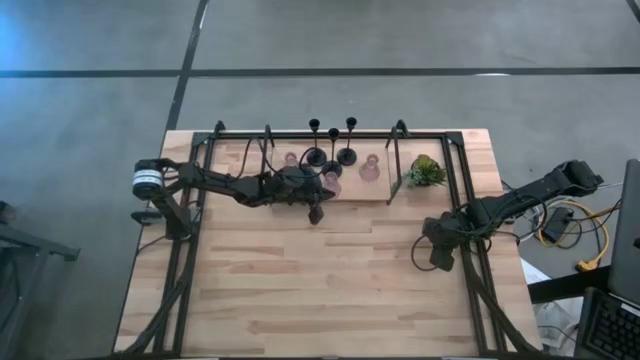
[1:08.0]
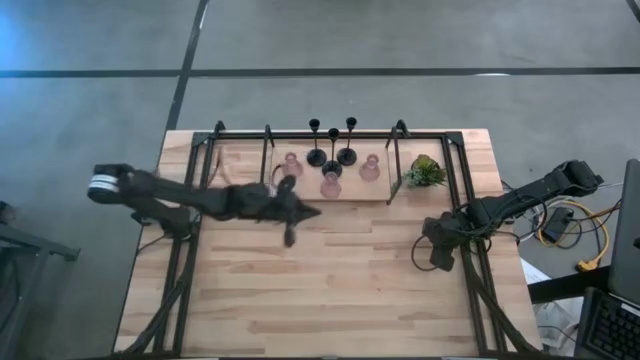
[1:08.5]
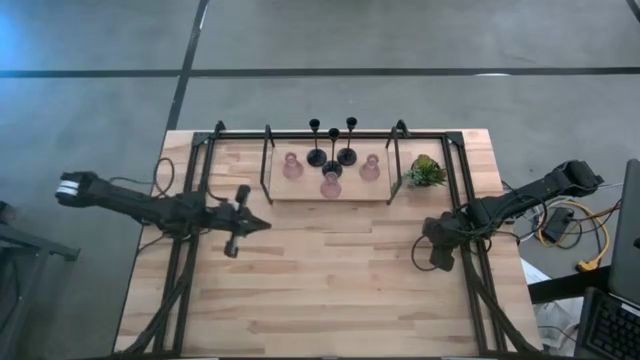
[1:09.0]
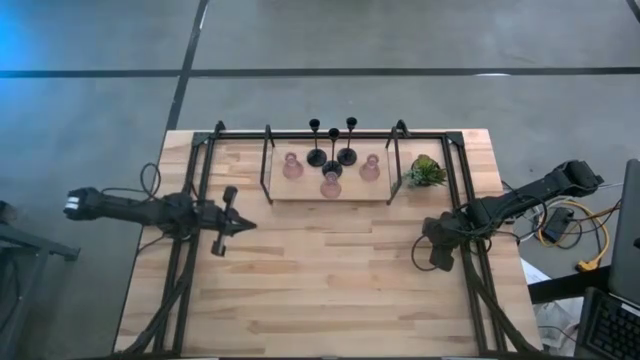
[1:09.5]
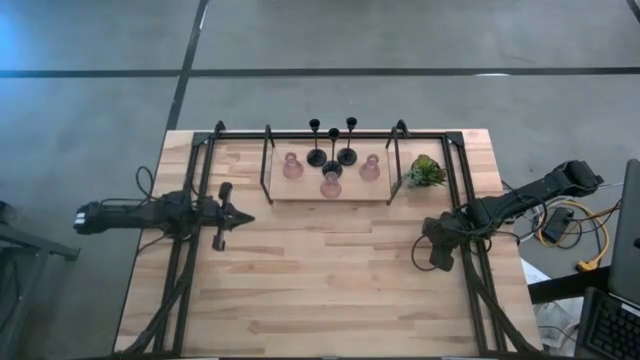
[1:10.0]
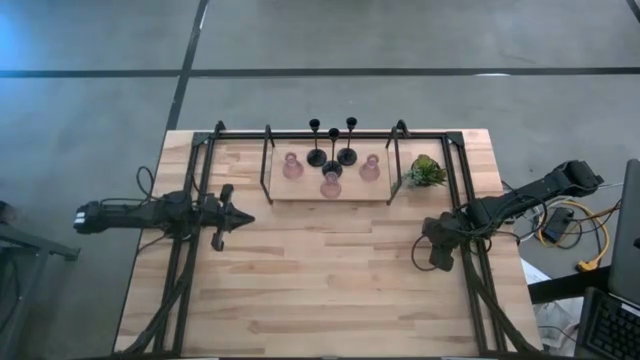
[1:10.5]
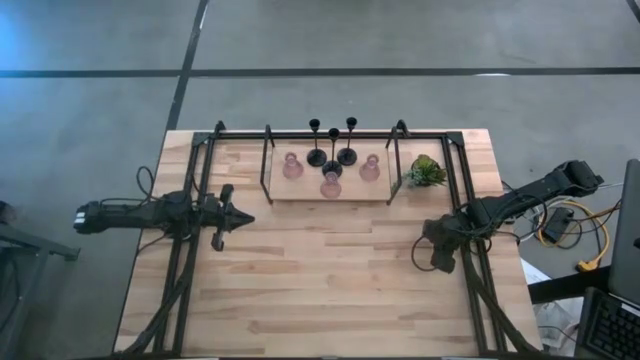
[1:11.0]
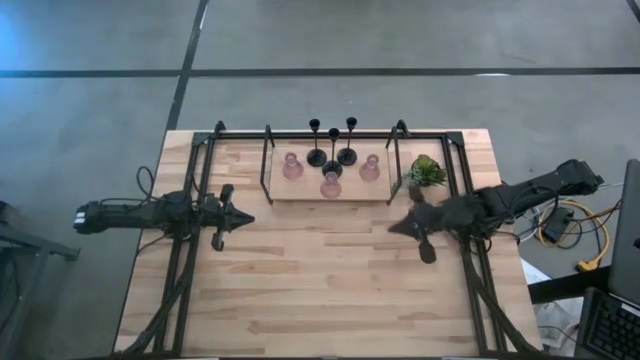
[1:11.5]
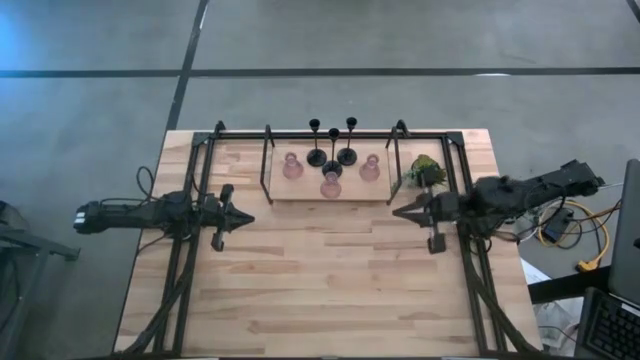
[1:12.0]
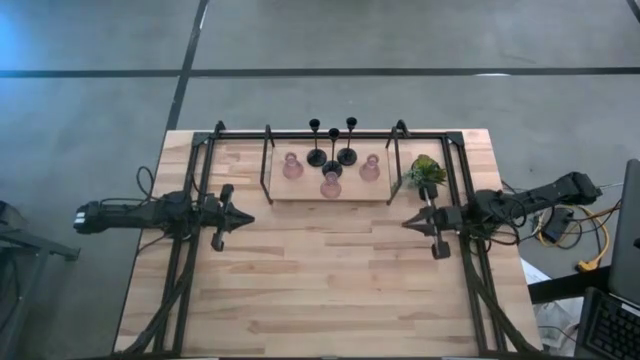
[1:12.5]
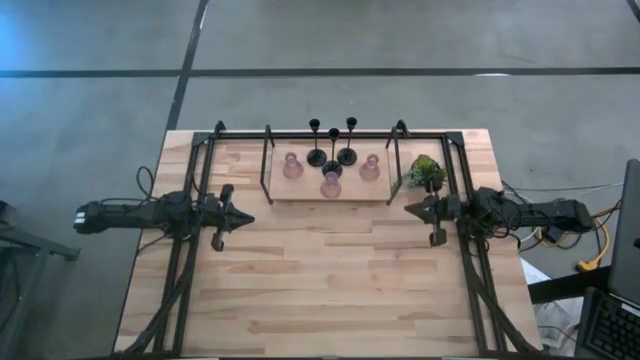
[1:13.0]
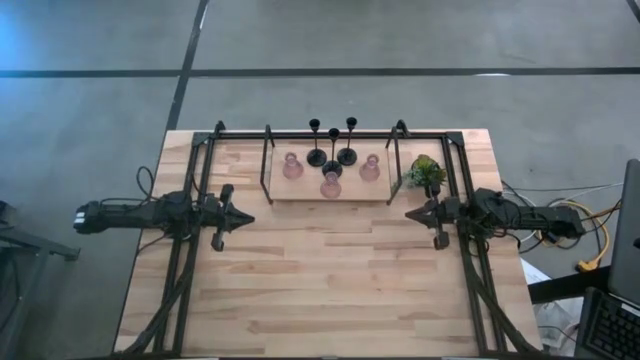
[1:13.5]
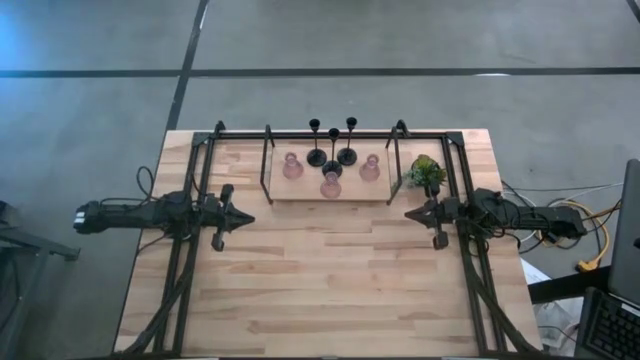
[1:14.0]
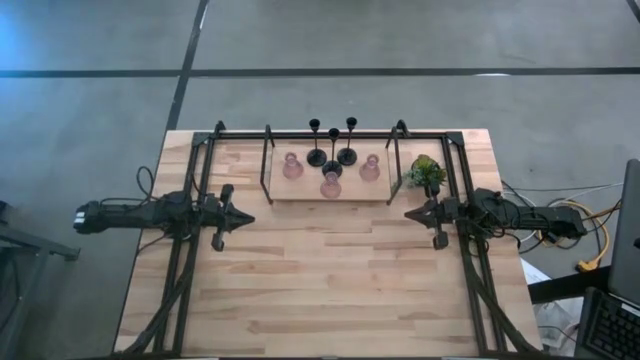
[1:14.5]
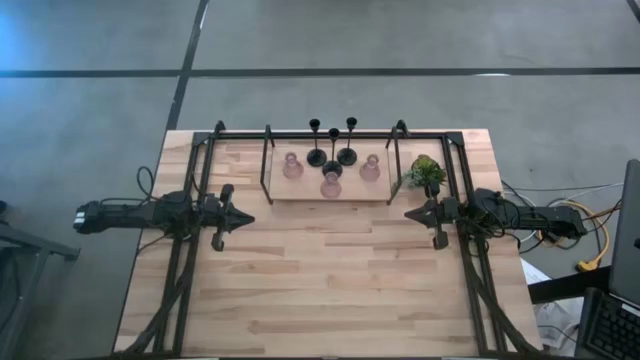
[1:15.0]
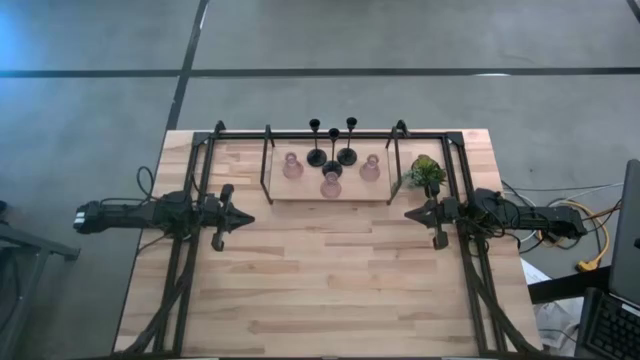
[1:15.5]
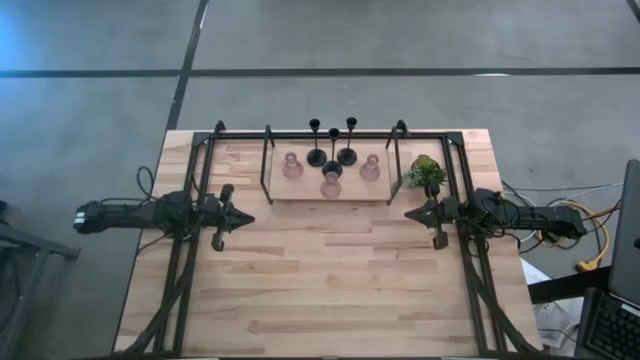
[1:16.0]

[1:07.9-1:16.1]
Task: Pick & Place candle stick holders
Return to Home Position

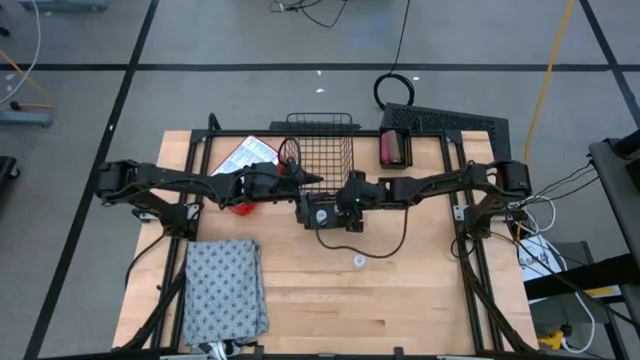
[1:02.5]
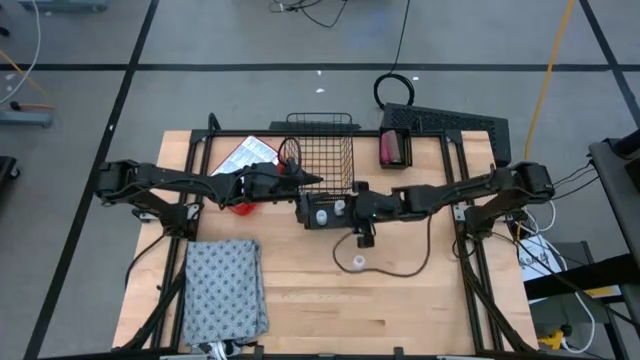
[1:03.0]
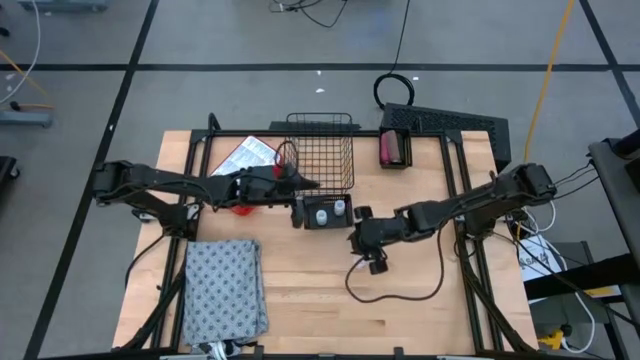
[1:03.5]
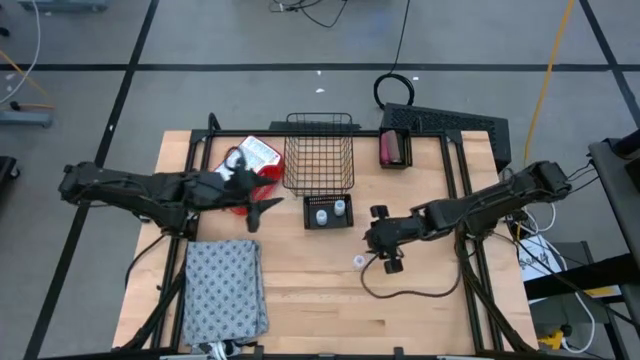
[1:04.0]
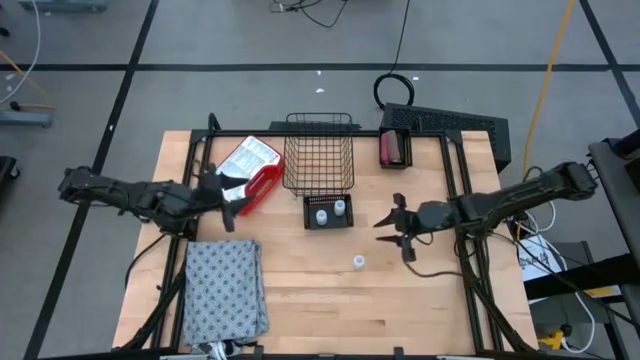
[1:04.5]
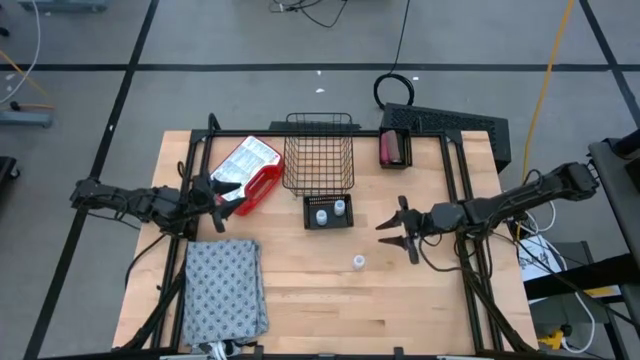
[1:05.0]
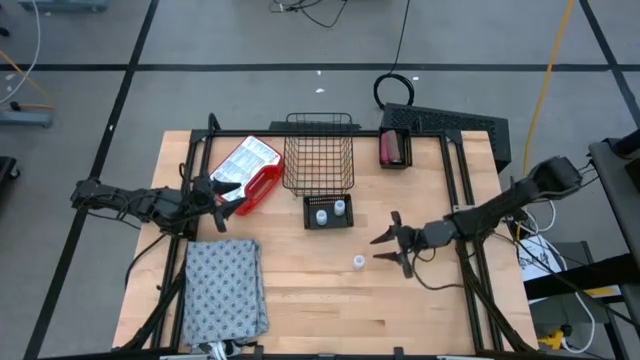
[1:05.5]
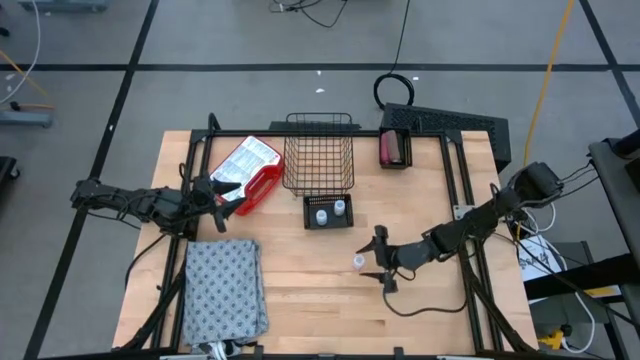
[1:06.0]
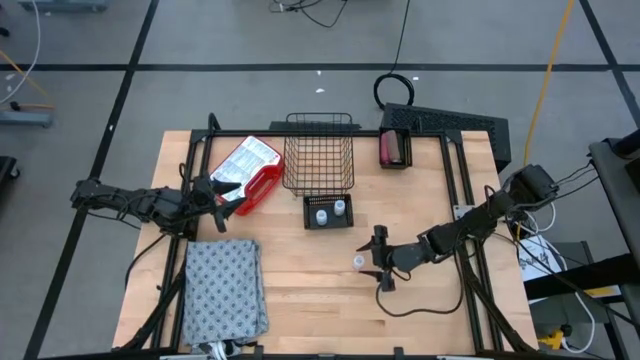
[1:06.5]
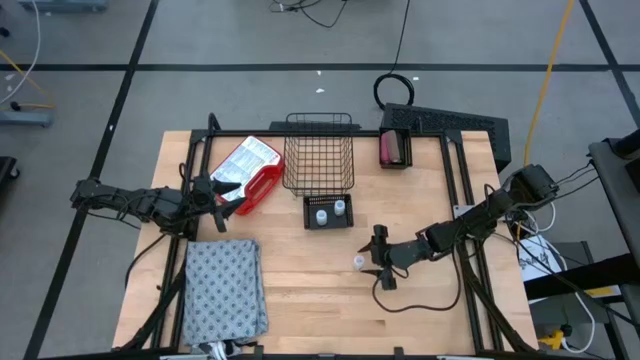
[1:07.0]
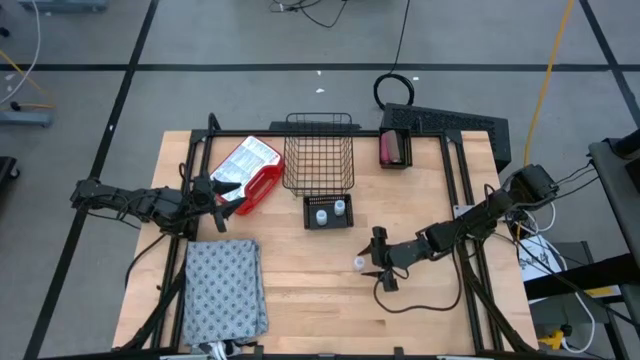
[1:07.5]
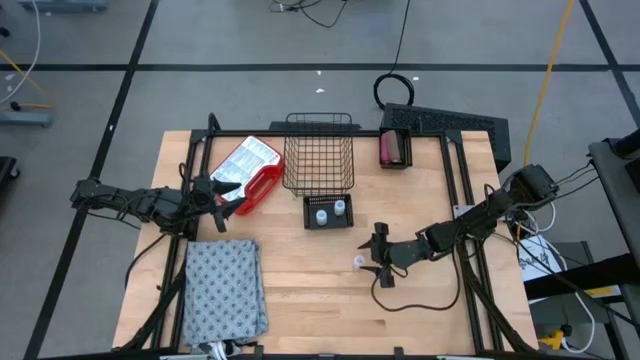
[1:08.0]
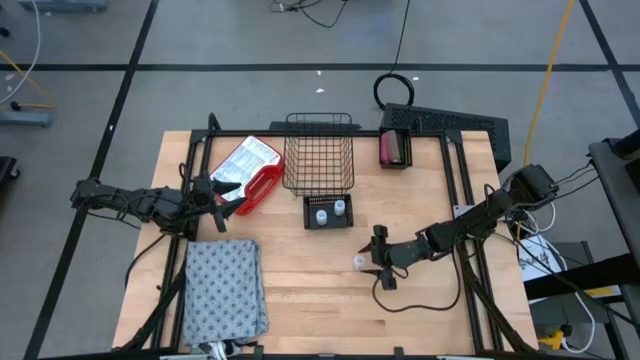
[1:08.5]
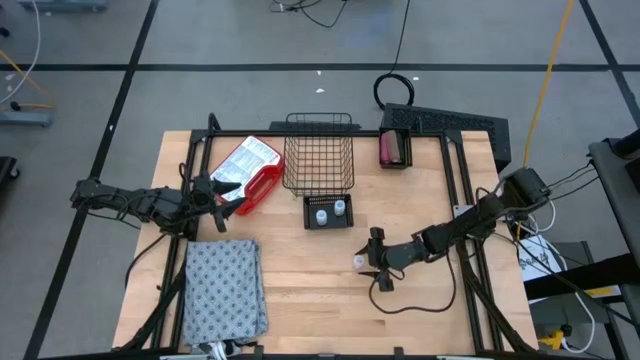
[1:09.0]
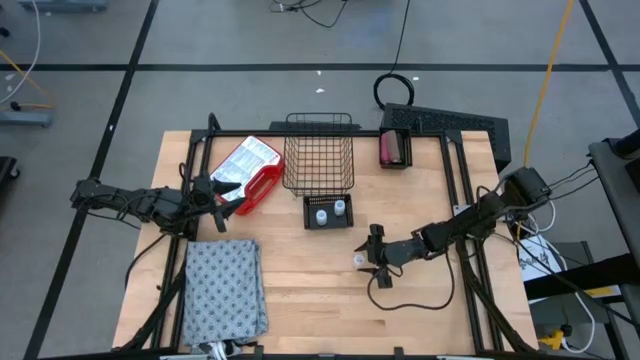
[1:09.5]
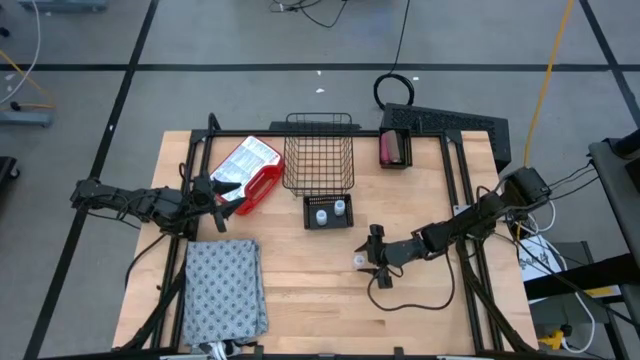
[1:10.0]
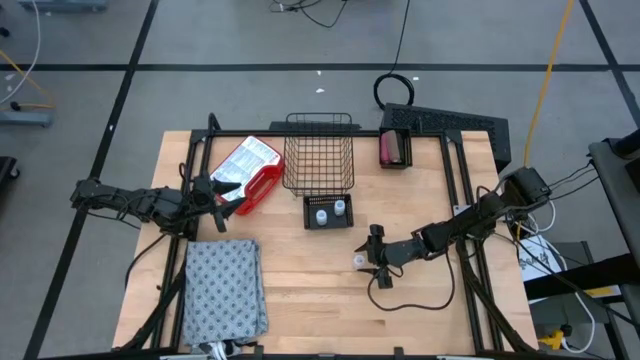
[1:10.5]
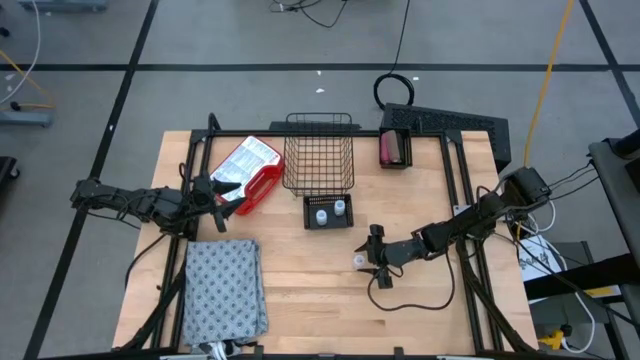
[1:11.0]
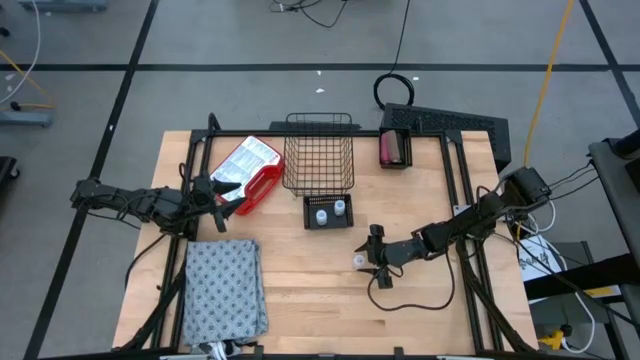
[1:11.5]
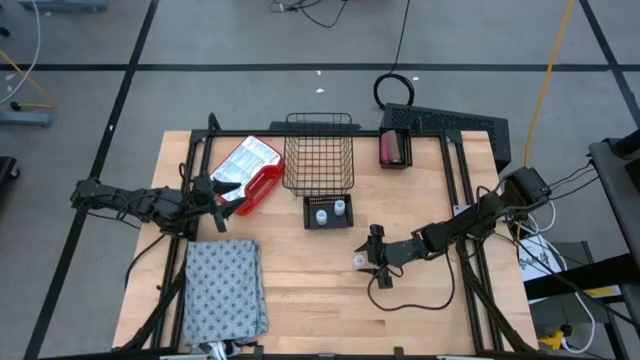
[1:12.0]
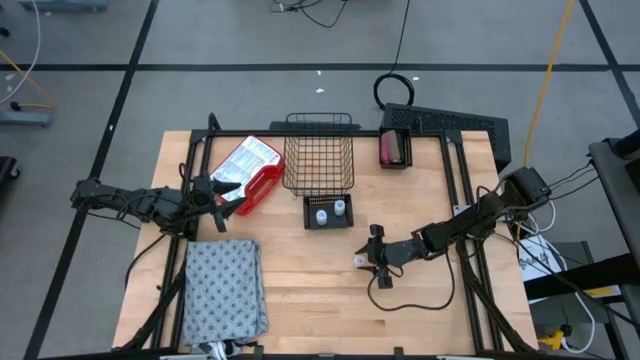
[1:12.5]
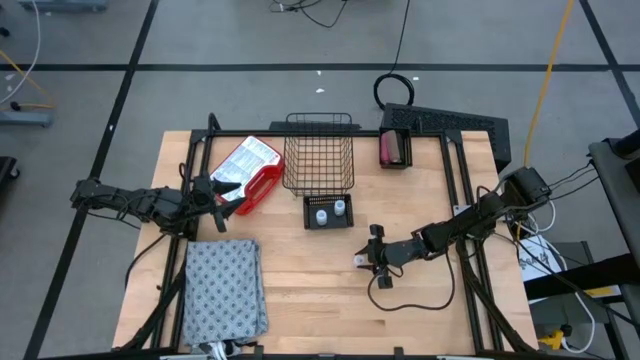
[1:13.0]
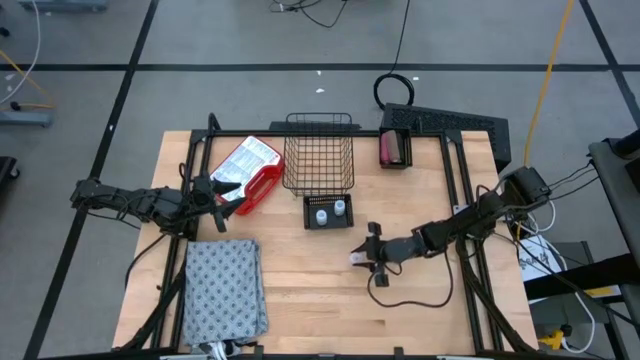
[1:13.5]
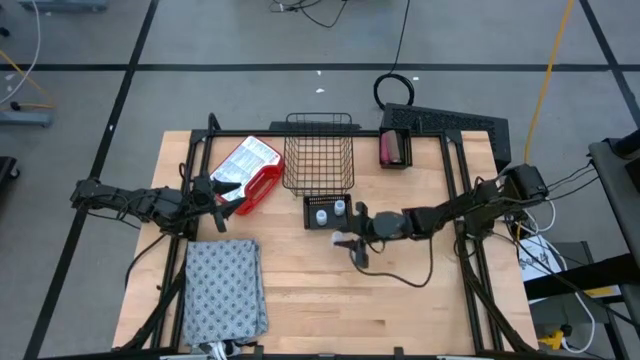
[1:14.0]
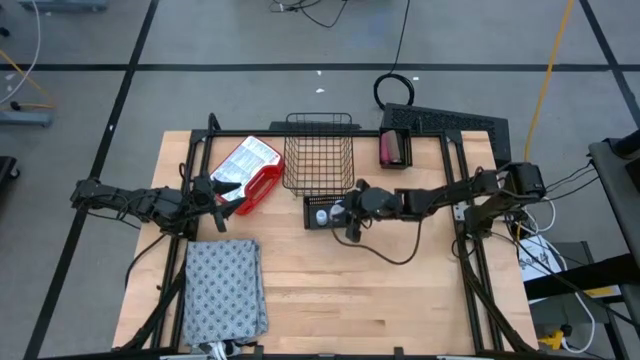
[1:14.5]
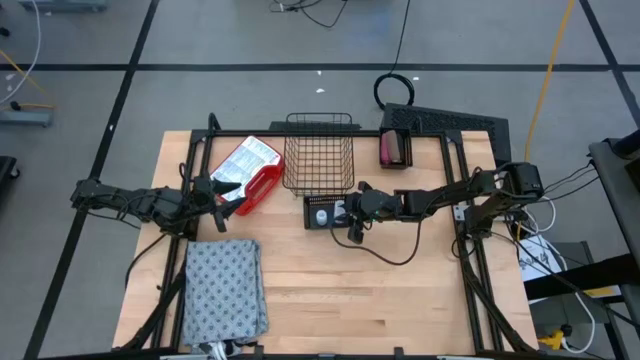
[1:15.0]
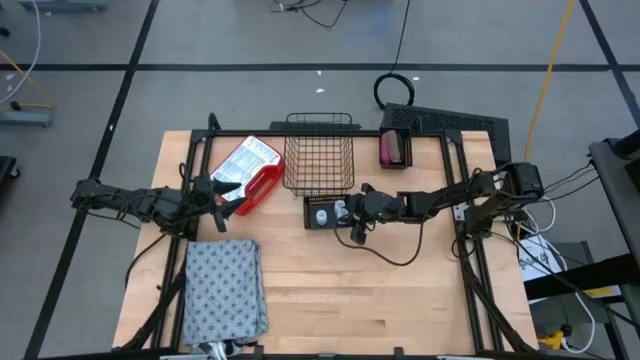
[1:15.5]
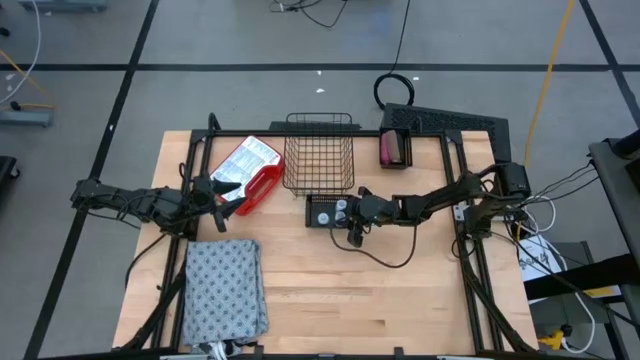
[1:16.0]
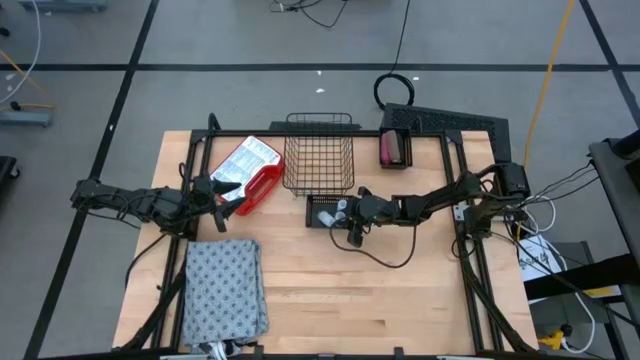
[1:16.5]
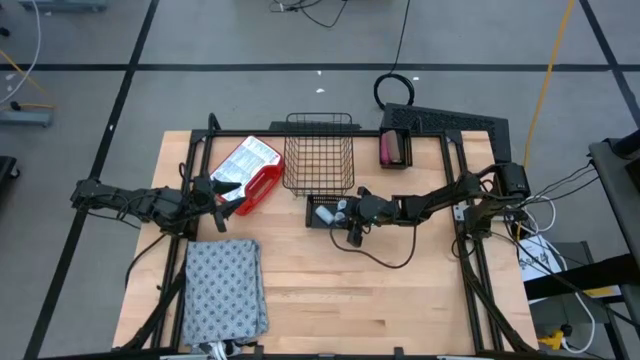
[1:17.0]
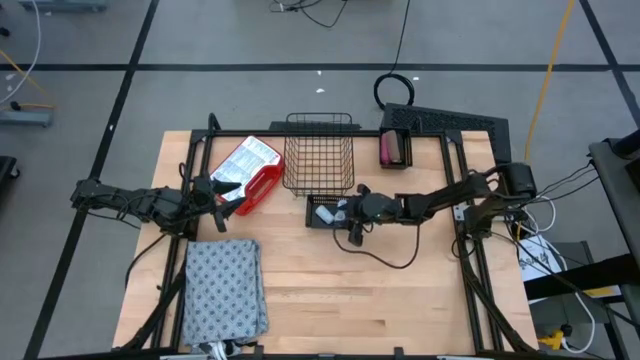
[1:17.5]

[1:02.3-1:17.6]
Task: Pick & place medical supplies in basket/bin
Put the white pill bottle into the bottom black bin
